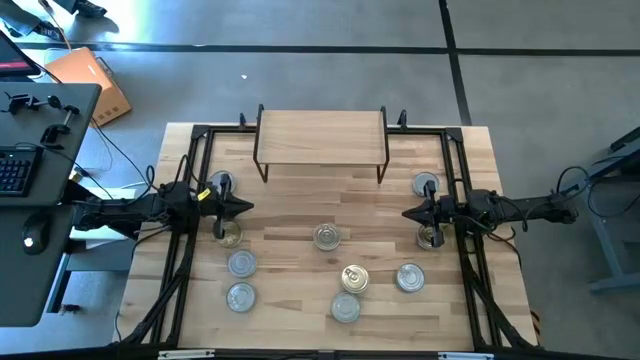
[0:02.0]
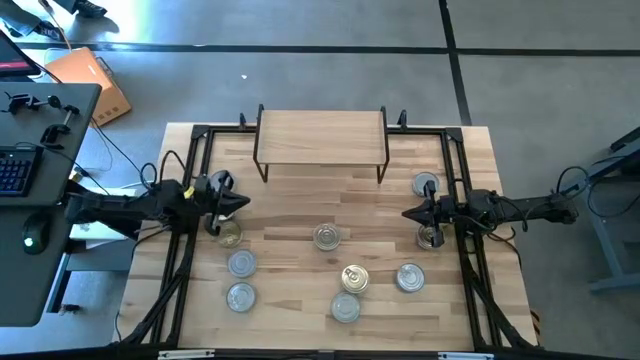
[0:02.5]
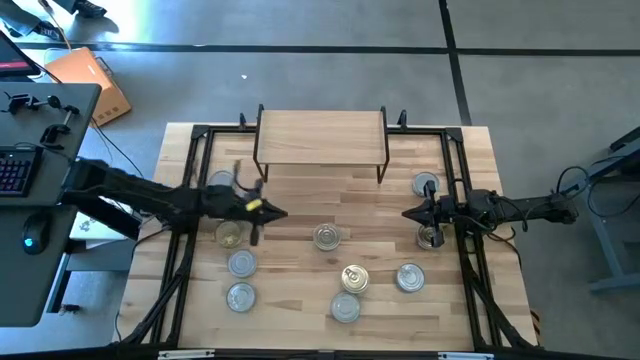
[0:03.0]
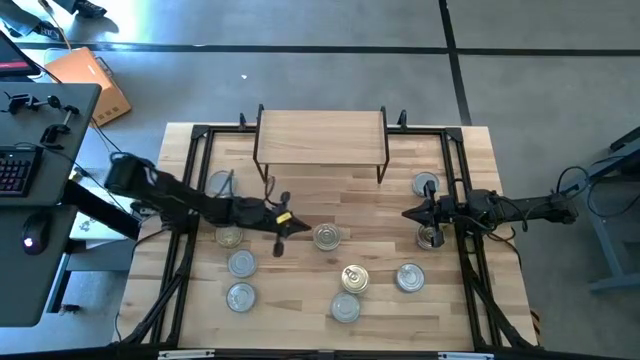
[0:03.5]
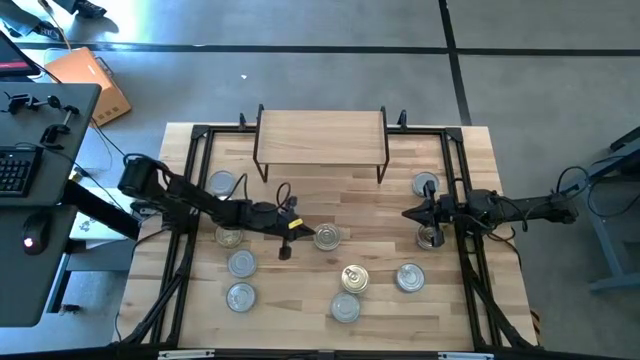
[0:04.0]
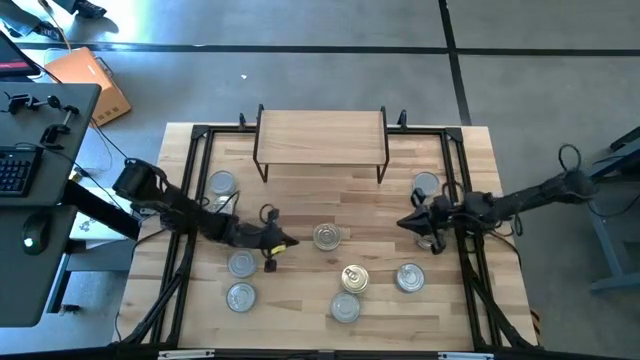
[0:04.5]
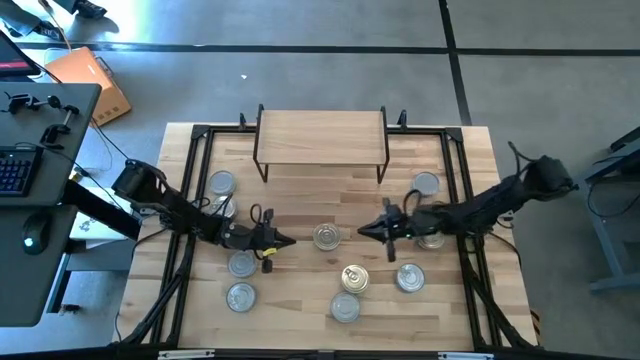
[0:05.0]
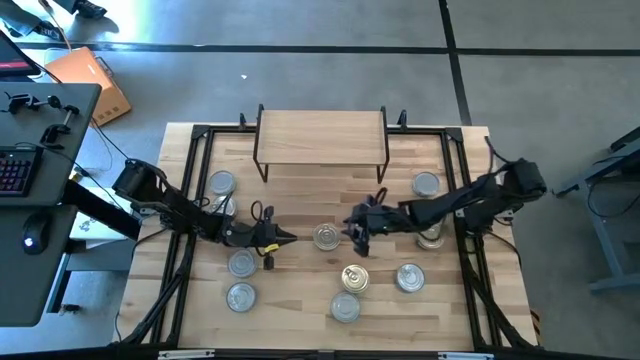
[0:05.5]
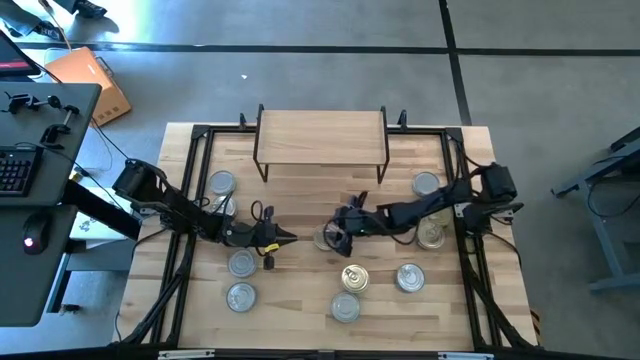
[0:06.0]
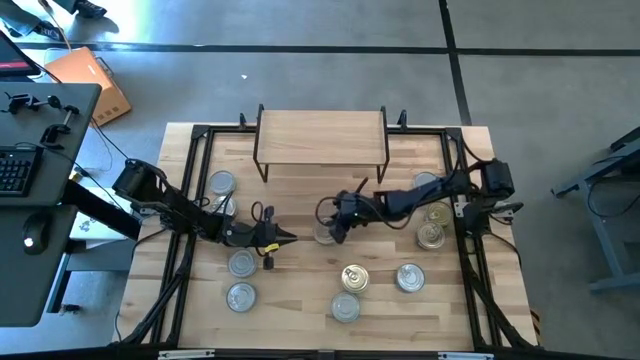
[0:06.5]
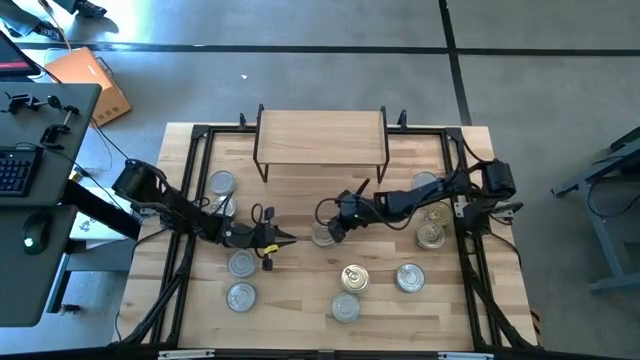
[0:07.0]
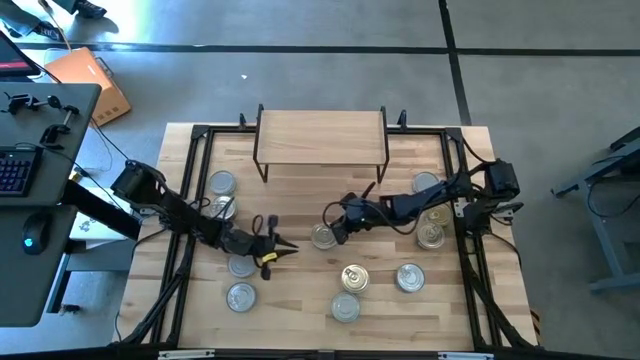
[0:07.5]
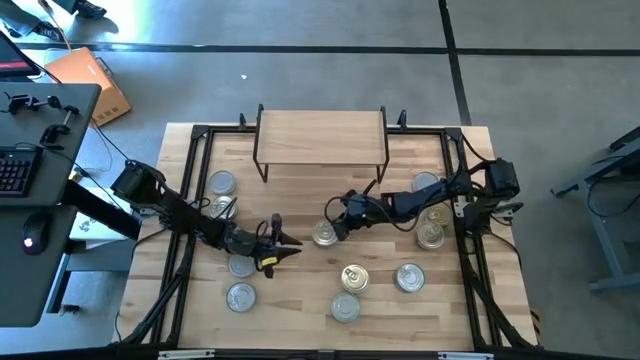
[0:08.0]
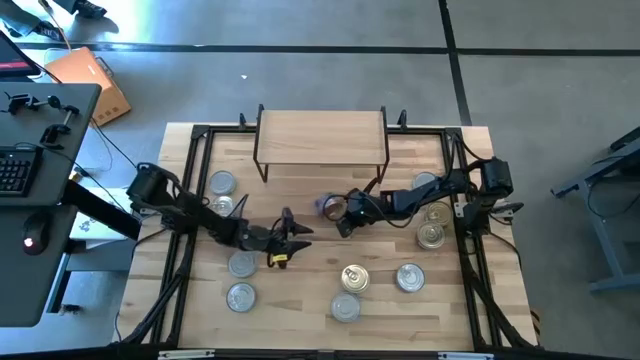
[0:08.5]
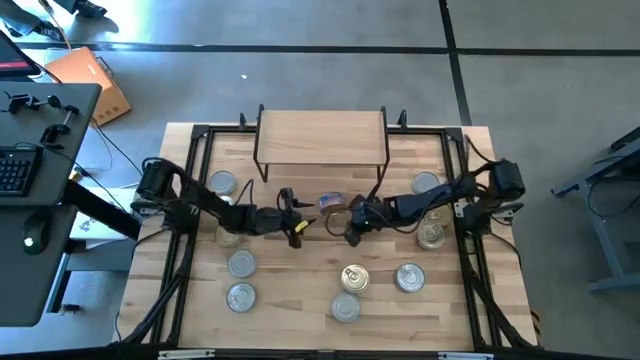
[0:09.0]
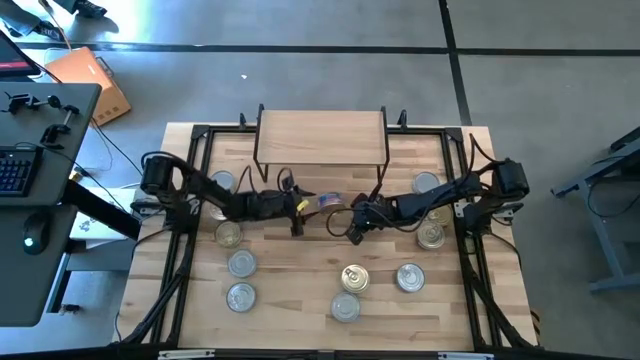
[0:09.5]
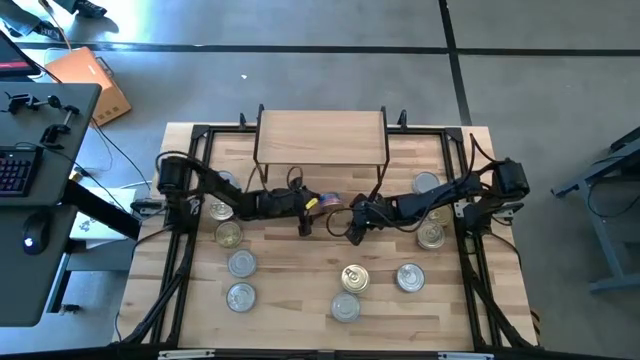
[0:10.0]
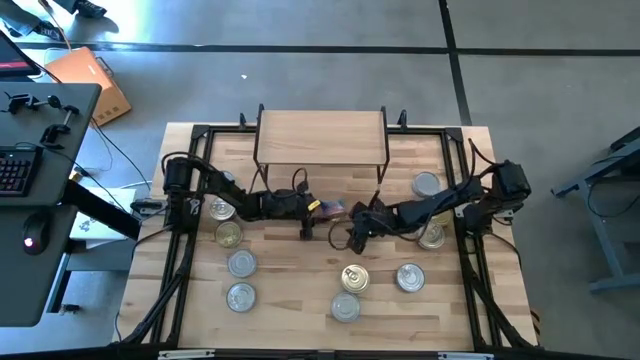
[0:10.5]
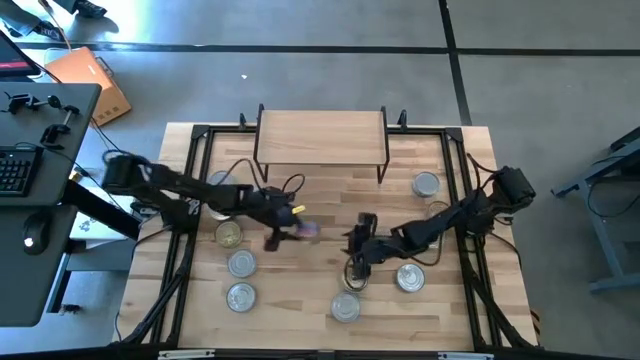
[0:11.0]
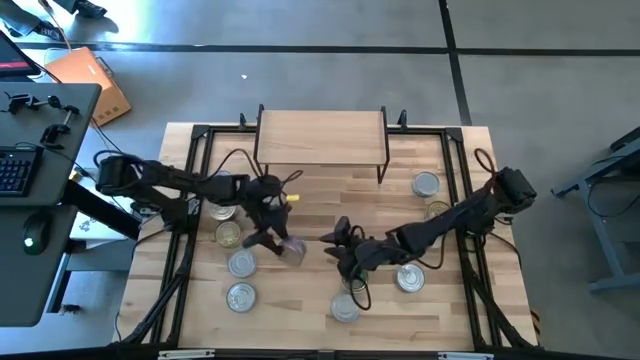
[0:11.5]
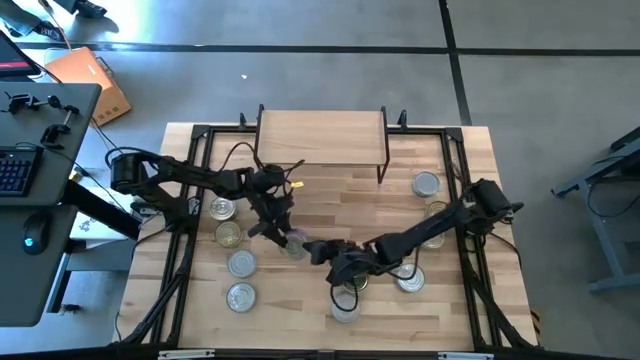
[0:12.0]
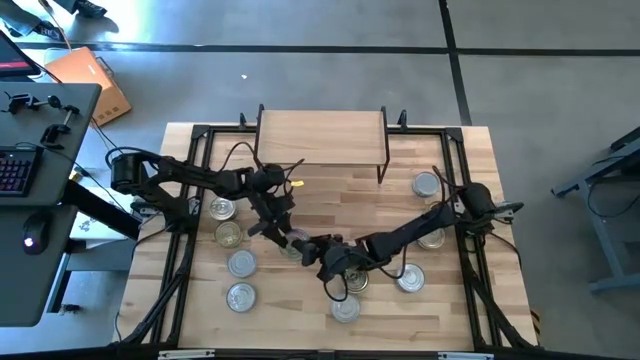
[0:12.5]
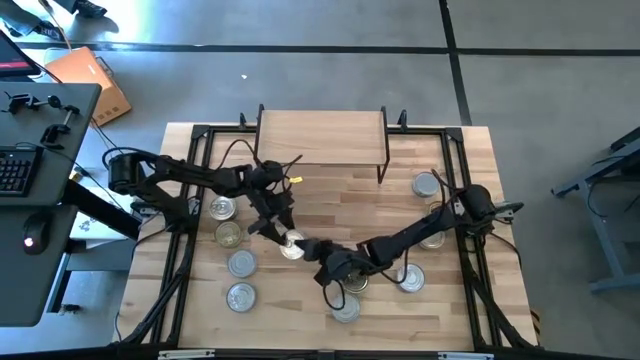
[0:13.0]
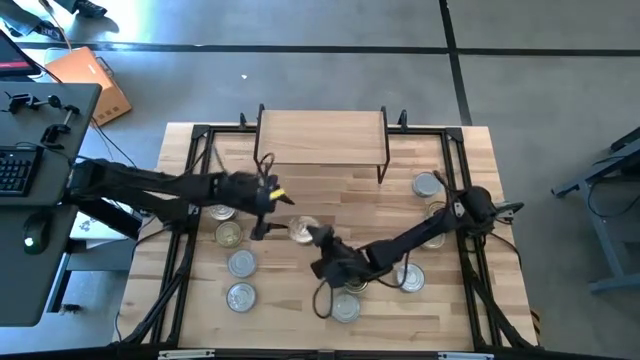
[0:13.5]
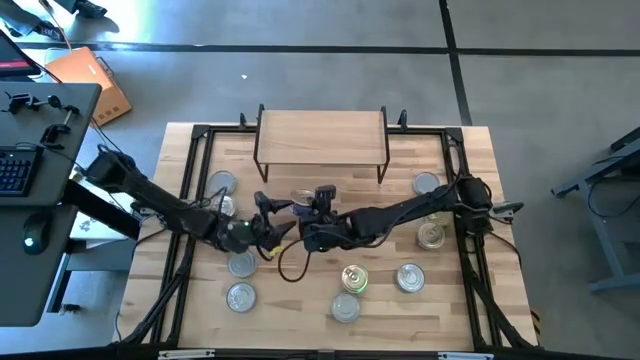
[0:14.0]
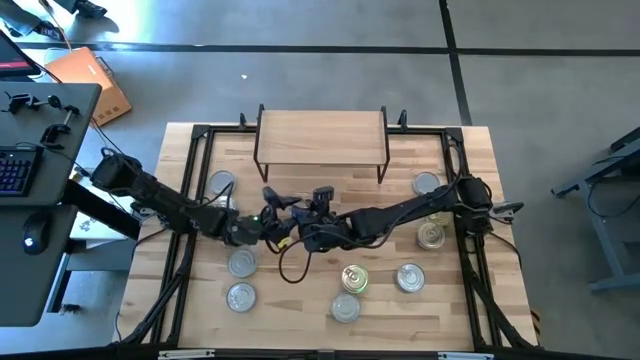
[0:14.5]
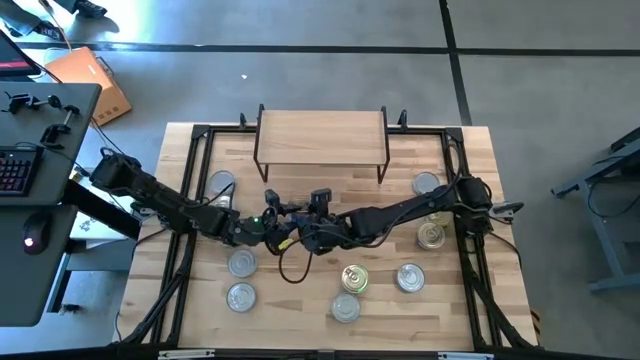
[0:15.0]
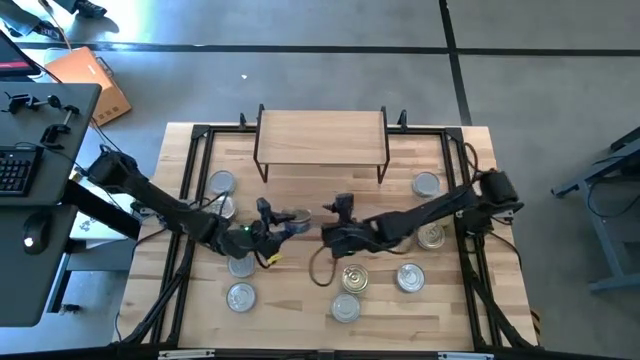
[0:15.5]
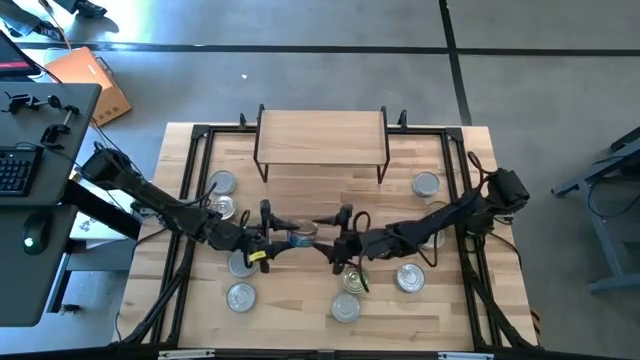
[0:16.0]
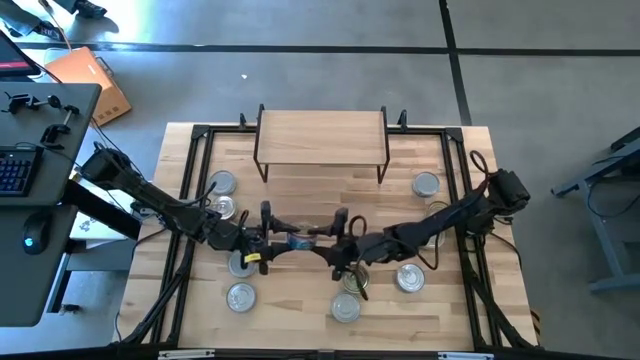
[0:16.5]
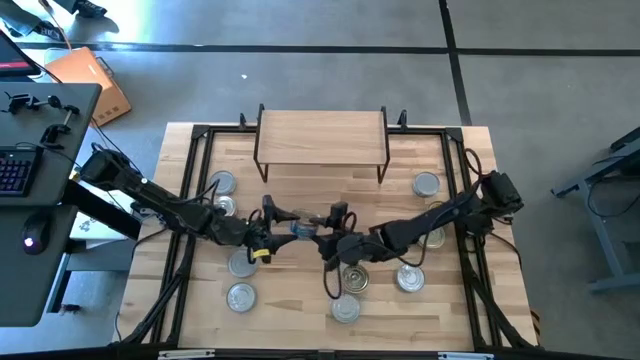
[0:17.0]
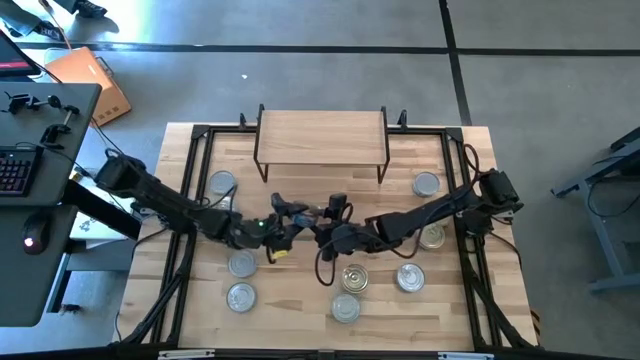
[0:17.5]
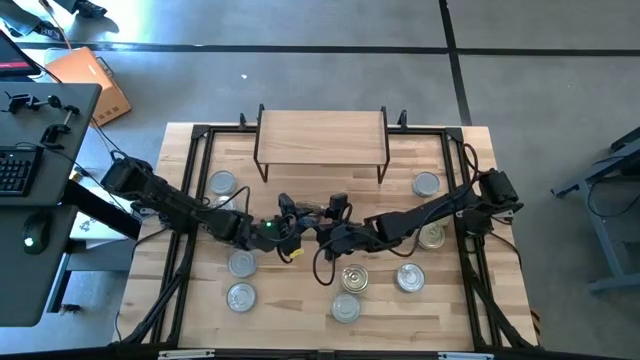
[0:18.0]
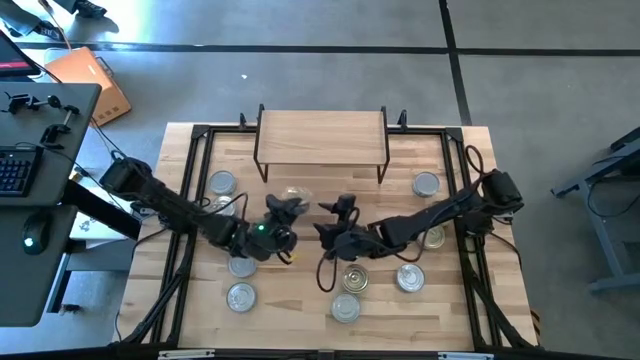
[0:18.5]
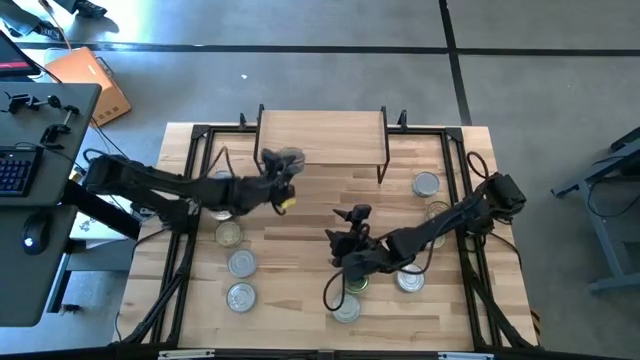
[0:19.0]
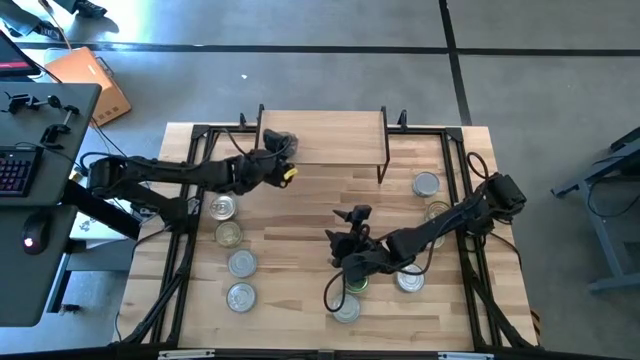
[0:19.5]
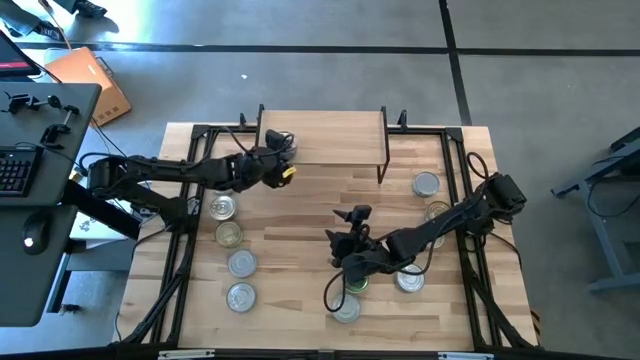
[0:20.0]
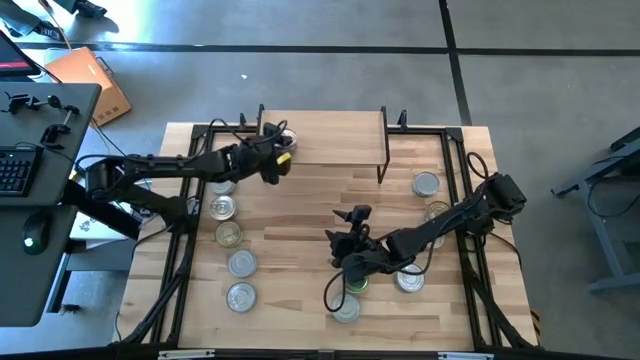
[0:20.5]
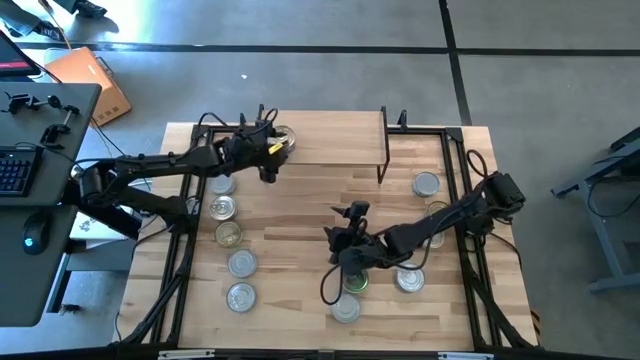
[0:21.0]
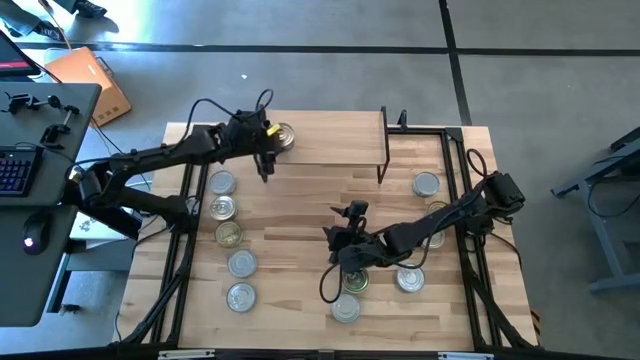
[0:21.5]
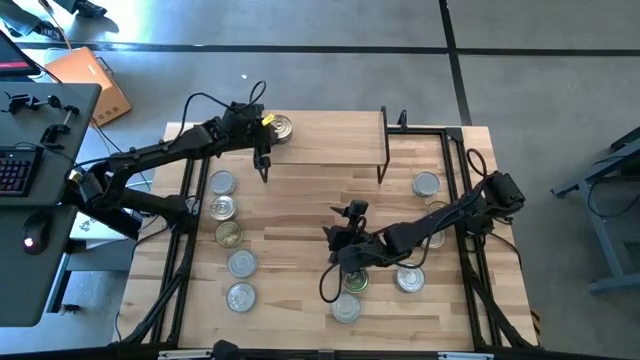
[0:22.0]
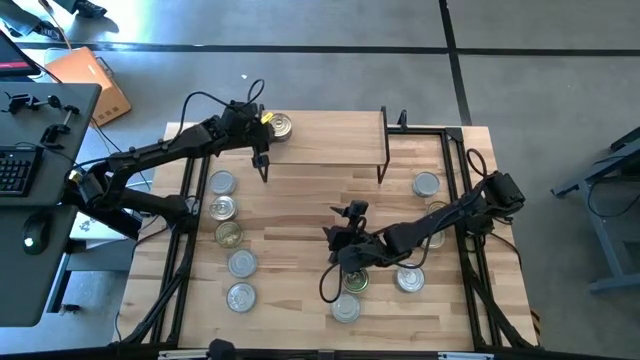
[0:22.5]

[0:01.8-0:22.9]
Task: Stack canned seafood by type on shelf
Put the blue and pink tuna can on the shelf
